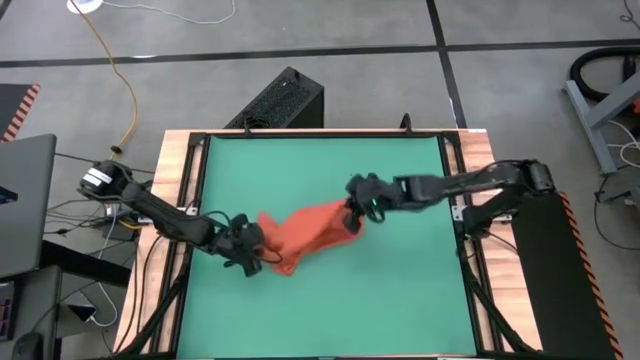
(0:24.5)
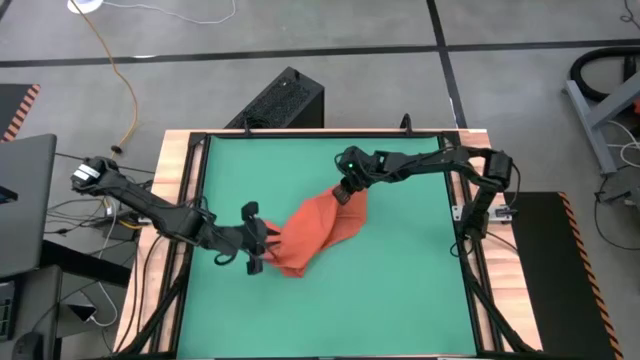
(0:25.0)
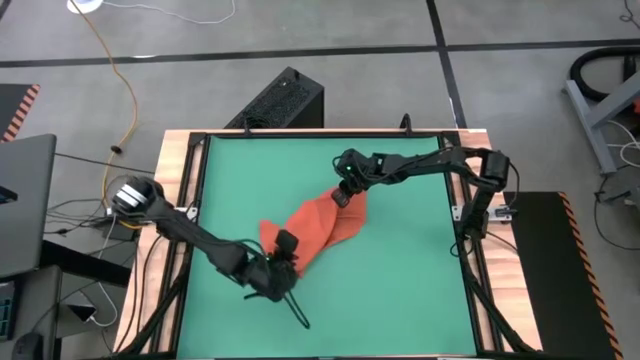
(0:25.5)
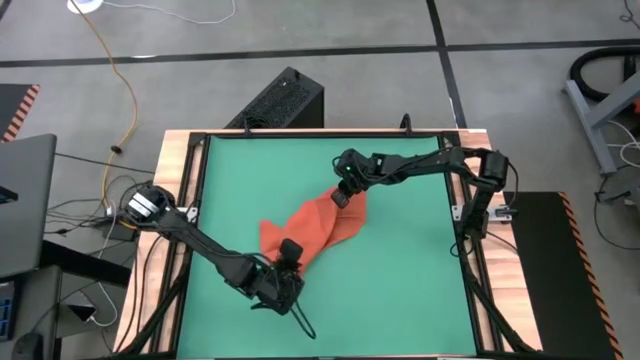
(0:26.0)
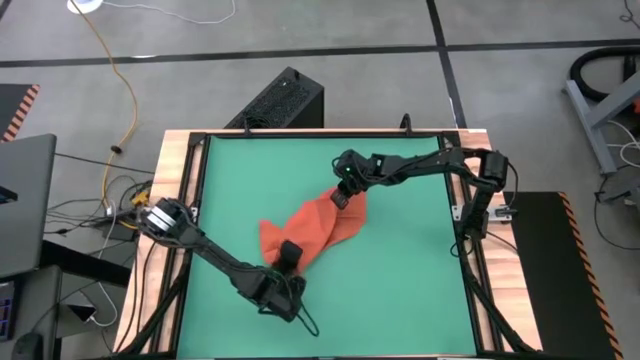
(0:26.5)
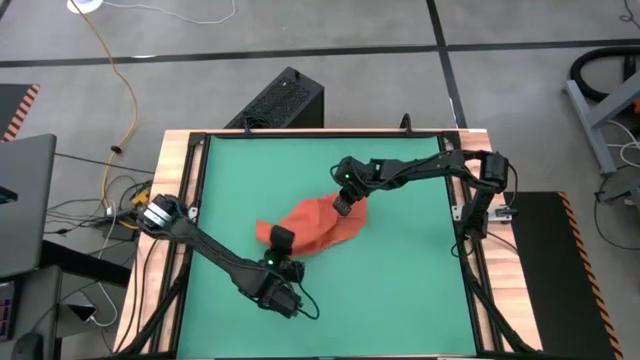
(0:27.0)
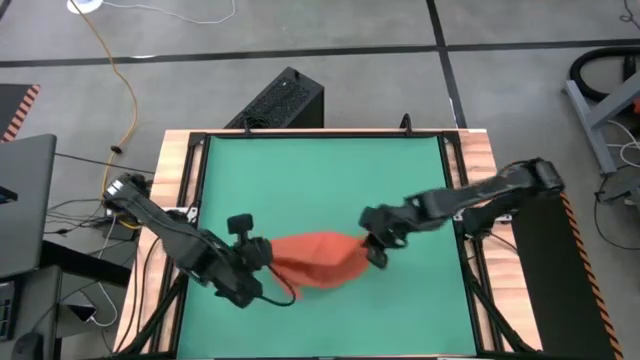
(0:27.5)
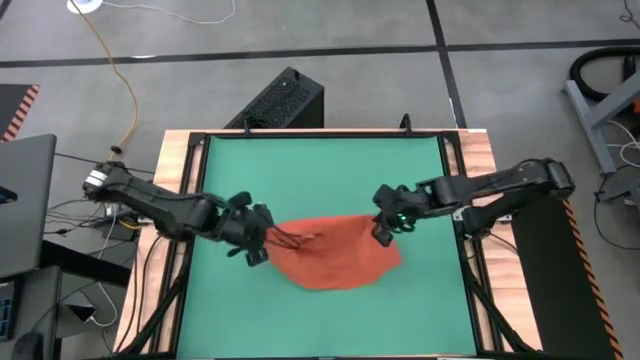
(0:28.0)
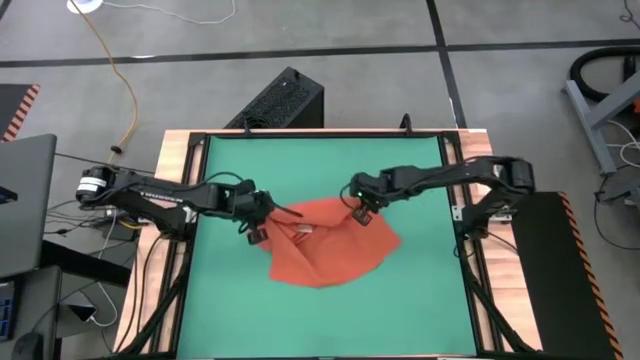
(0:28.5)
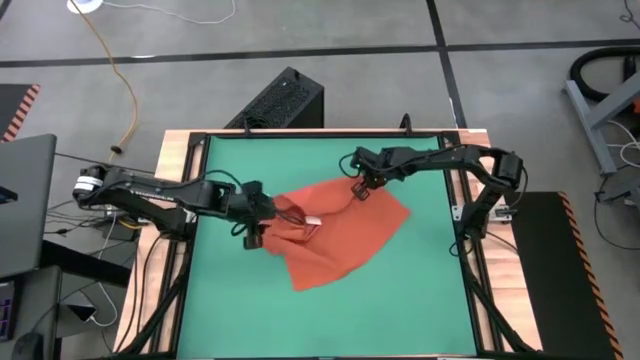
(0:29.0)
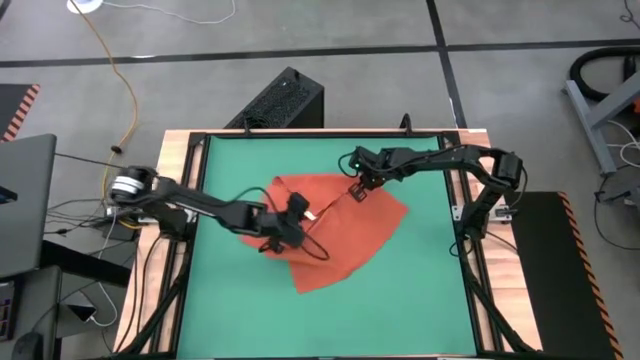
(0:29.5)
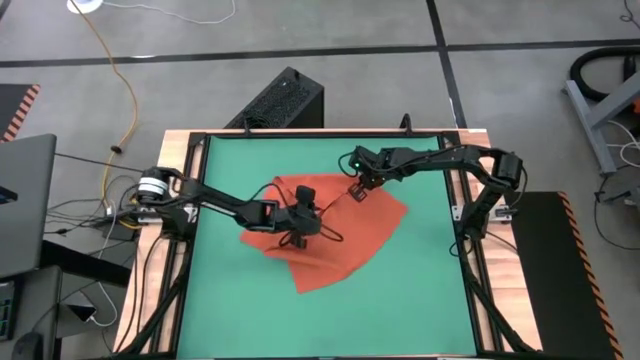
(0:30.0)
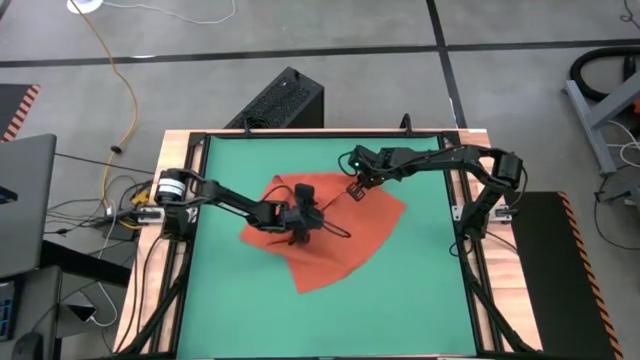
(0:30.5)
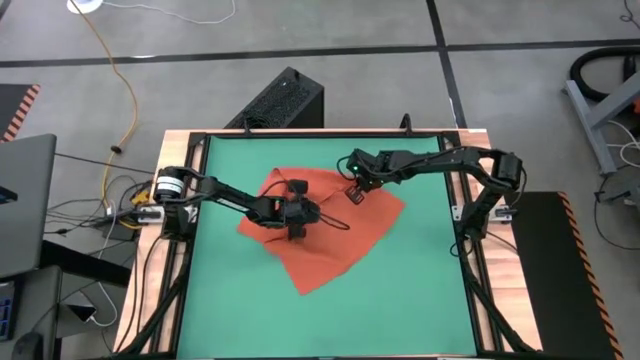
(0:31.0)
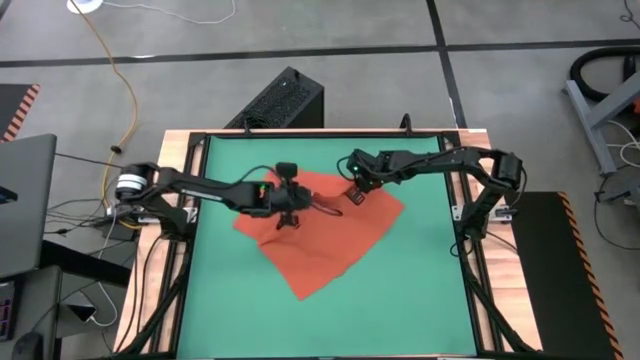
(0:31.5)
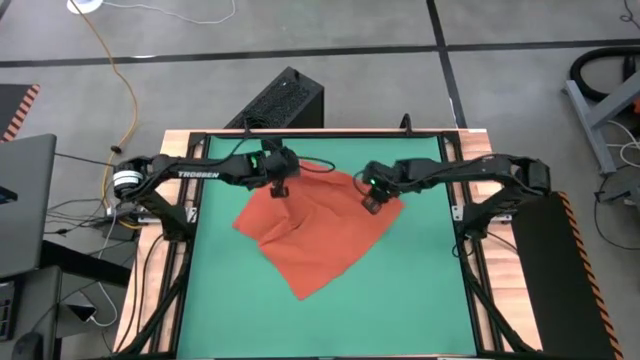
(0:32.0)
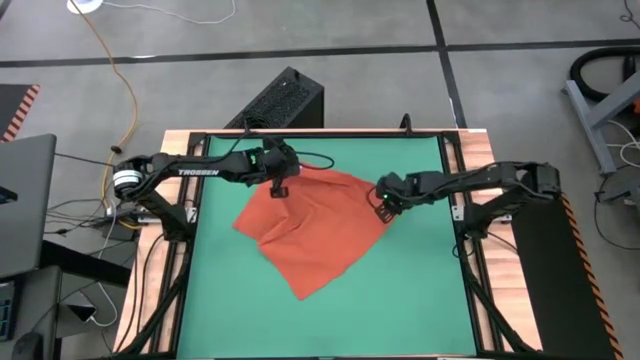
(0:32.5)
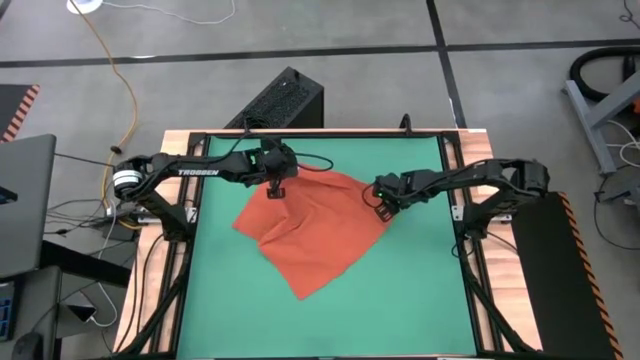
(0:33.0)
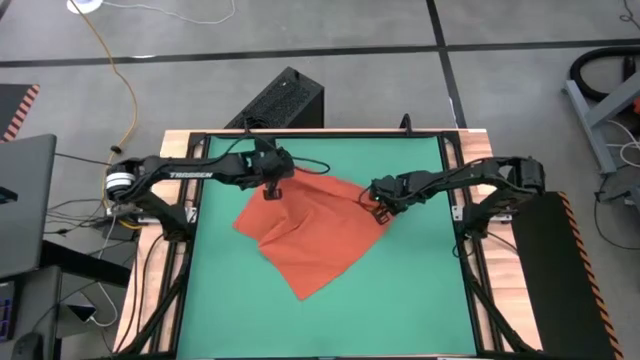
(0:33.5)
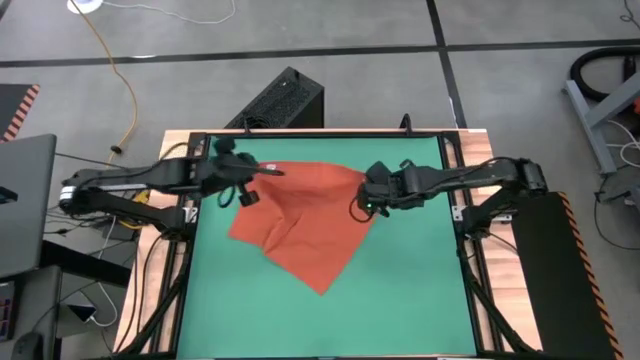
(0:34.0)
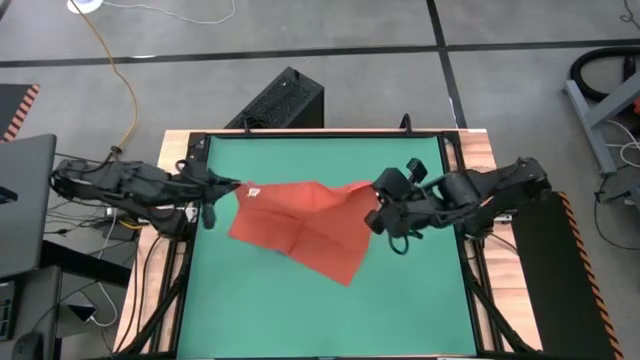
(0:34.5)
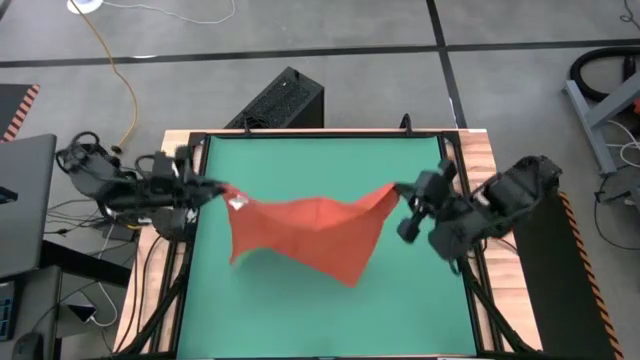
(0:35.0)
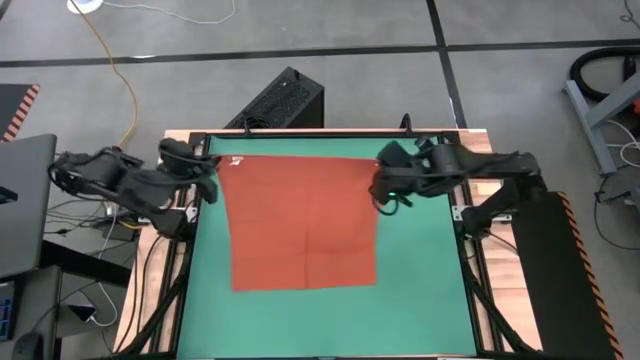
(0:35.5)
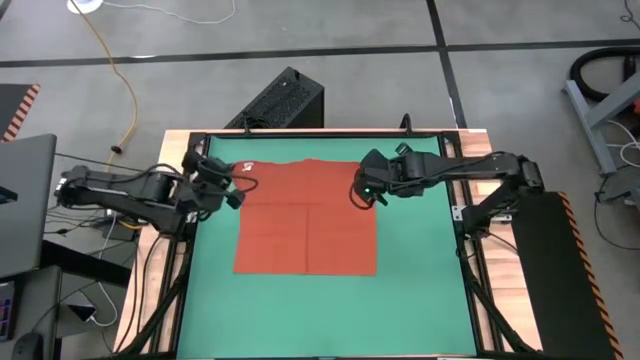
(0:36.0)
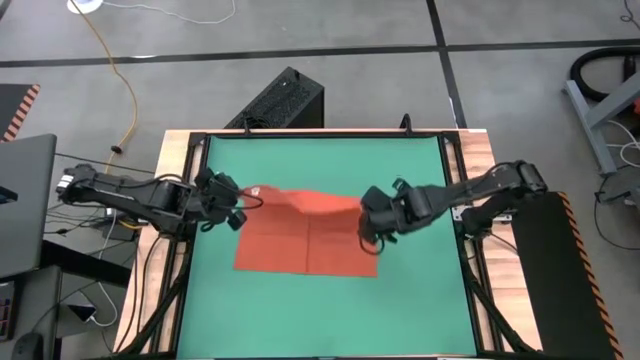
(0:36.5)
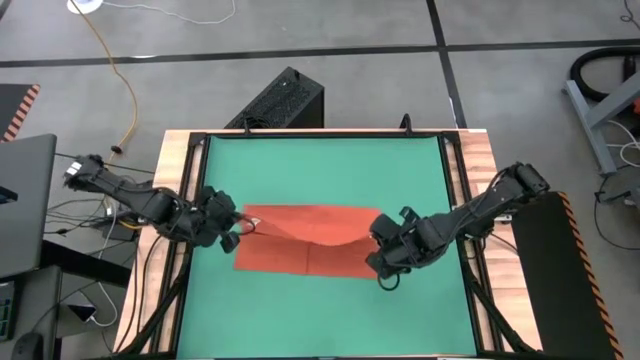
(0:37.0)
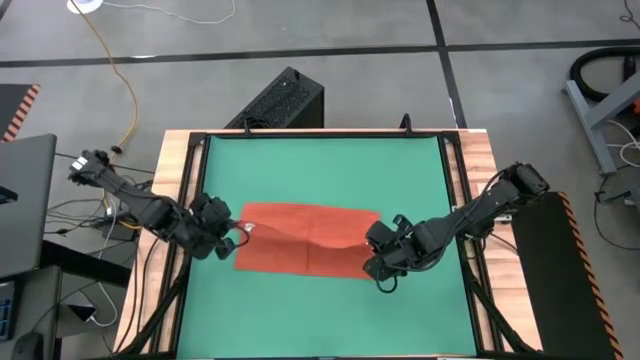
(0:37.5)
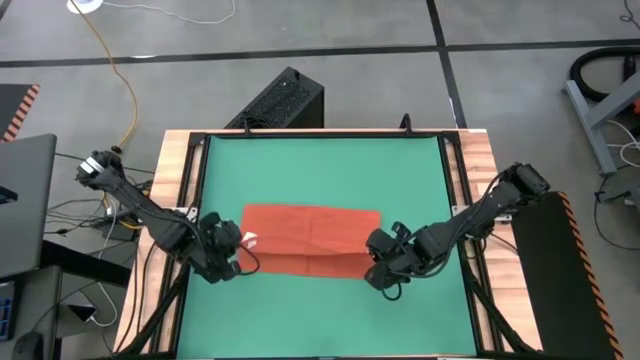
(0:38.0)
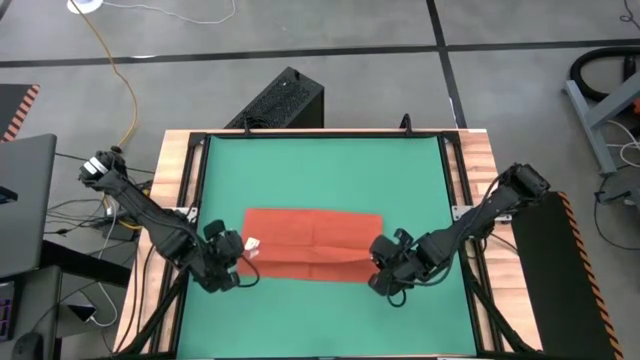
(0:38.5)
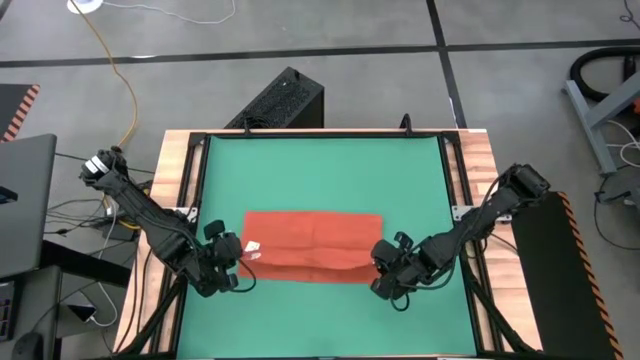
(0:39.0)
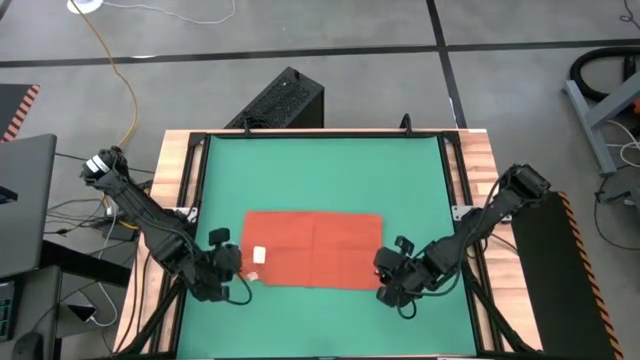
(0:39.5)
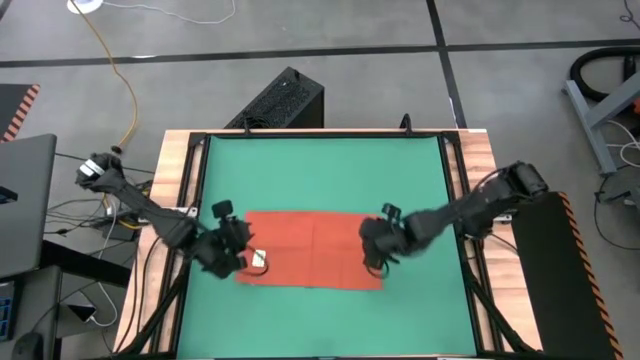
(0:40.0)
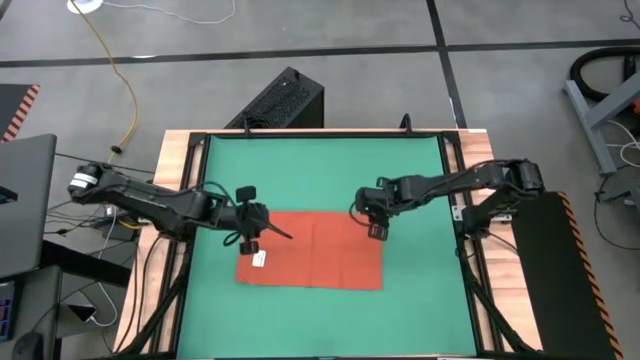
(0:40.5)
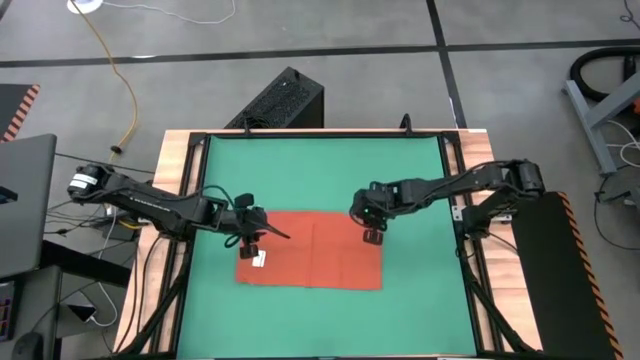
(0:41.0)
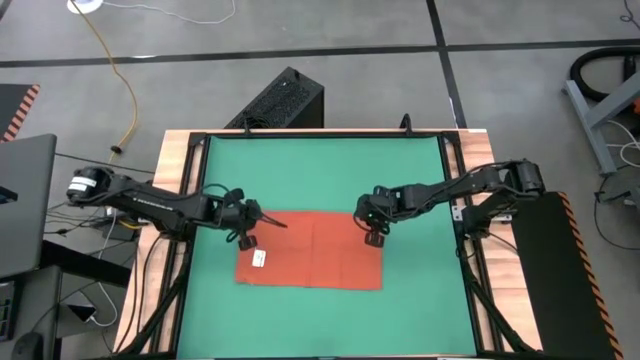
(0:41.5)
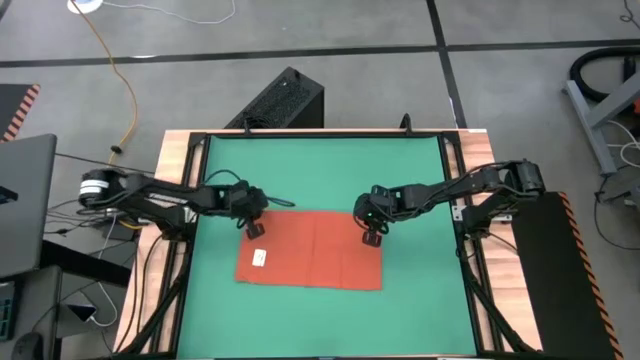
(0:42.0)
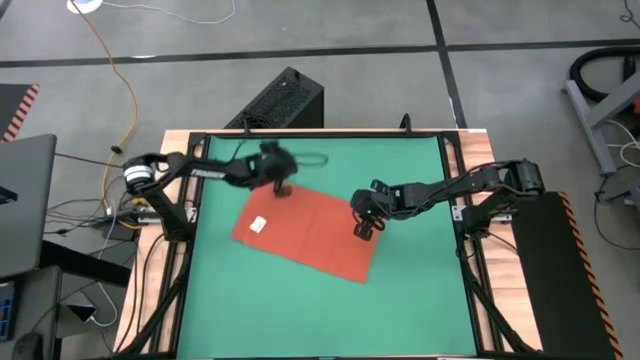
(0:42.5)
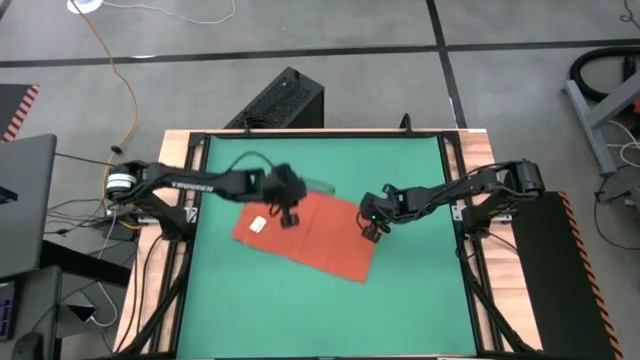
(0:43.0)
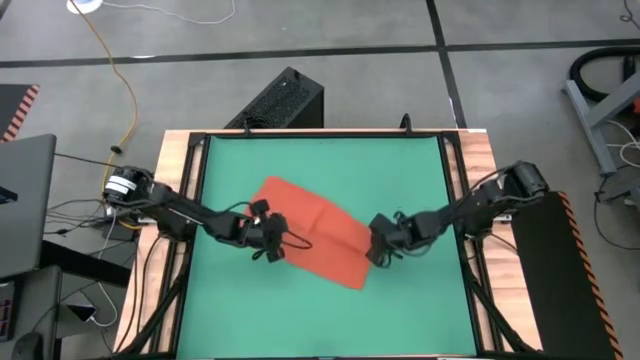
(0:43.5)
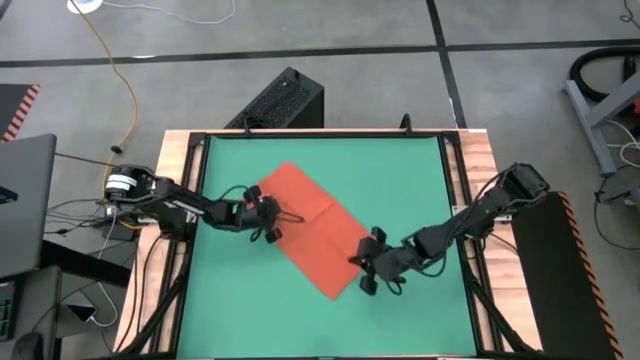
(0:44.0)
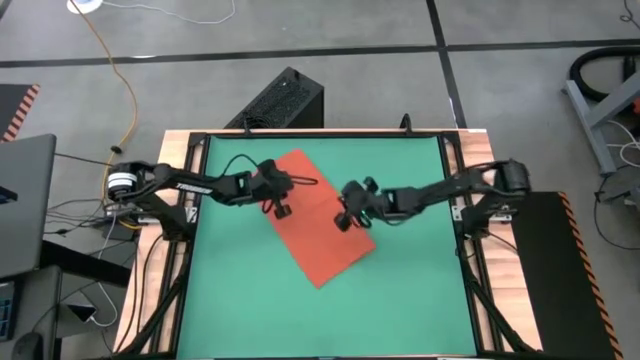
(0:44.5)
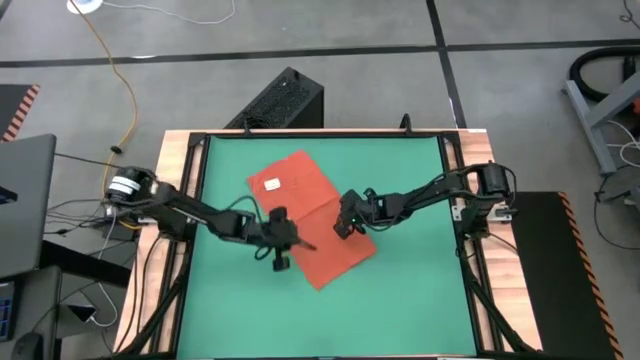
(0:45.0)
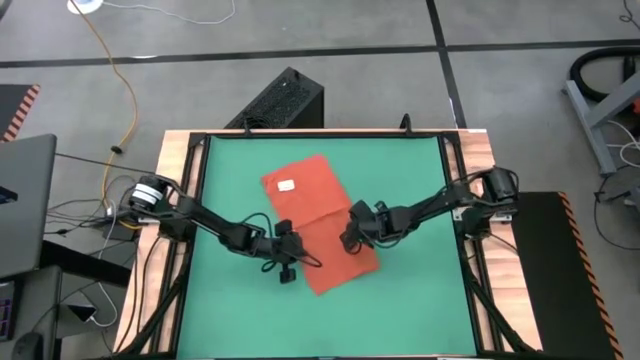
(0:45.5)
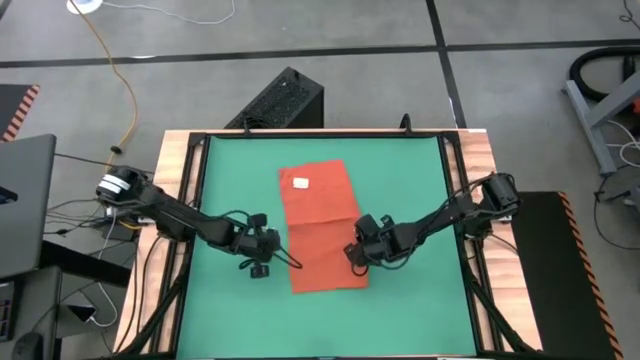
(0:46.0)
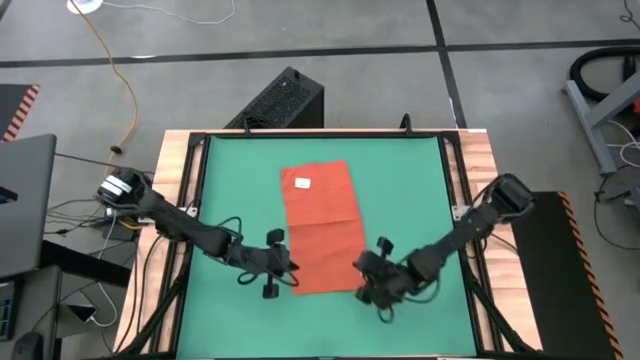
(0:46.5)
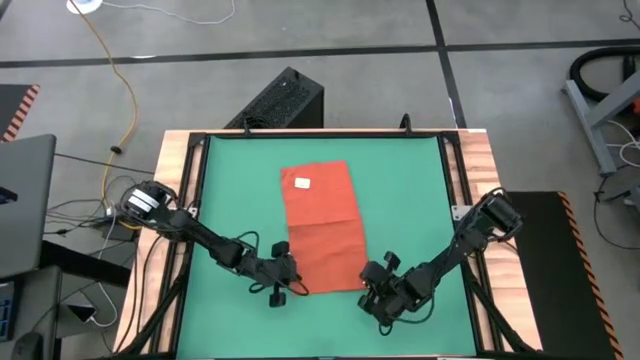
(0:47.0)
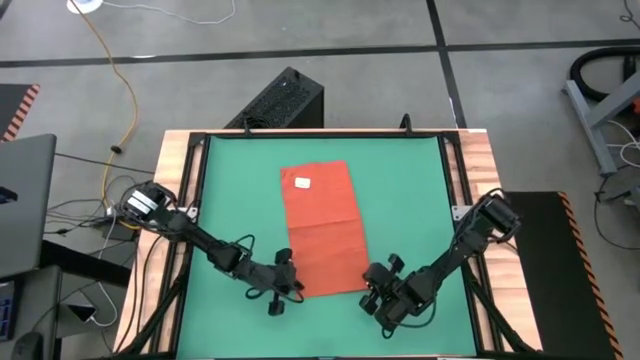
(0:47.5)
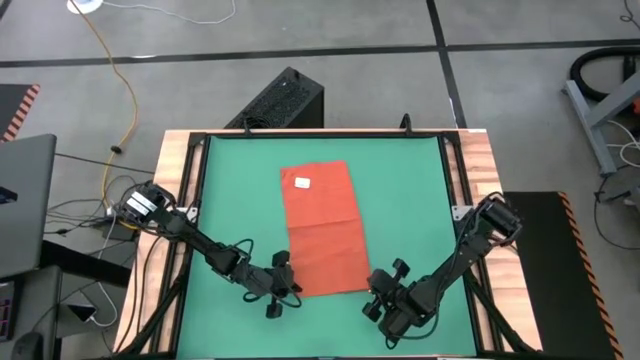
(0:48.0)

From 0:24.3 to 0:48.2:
Task: Roll towel
Roll the orange towel
